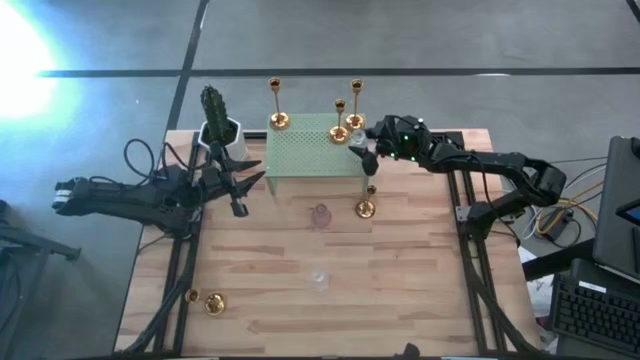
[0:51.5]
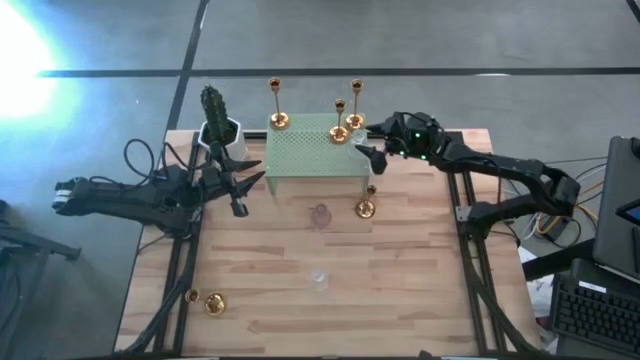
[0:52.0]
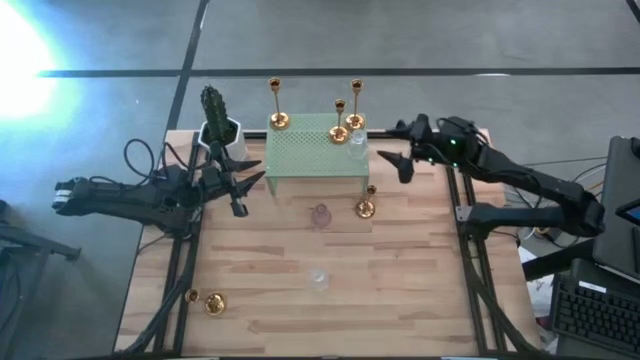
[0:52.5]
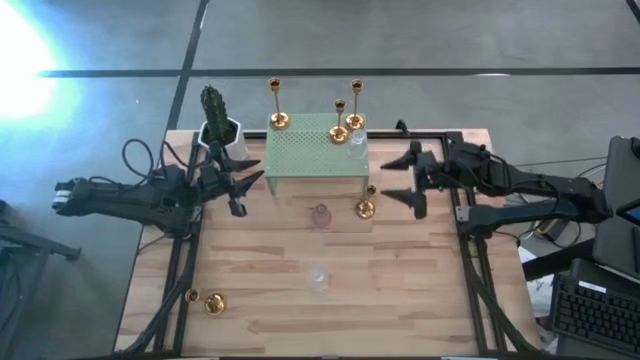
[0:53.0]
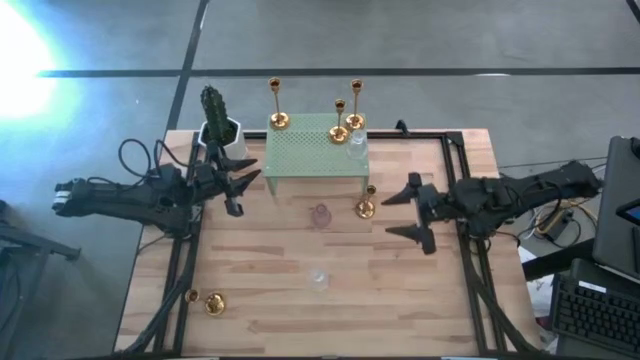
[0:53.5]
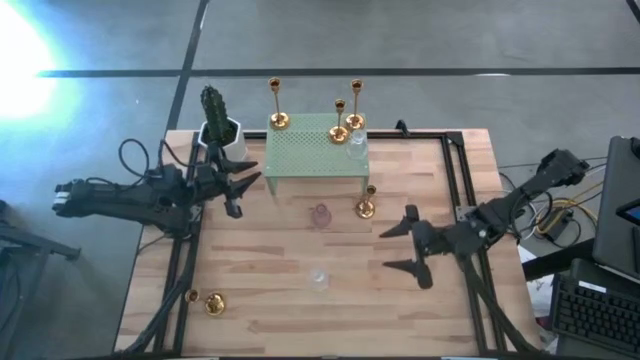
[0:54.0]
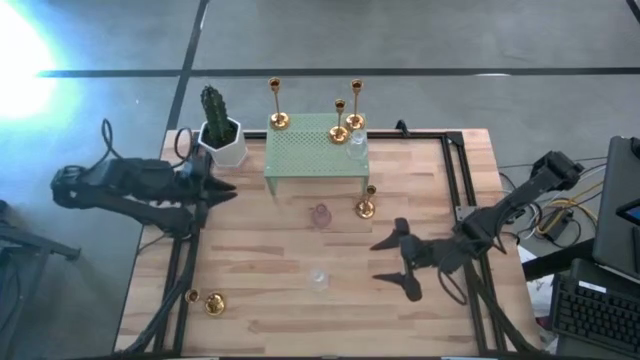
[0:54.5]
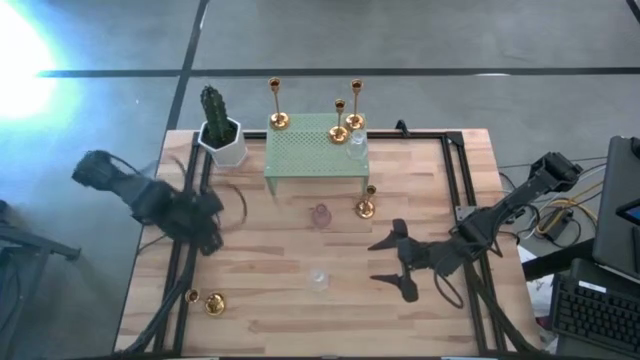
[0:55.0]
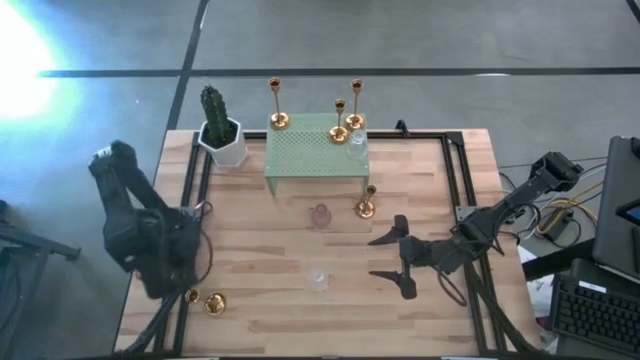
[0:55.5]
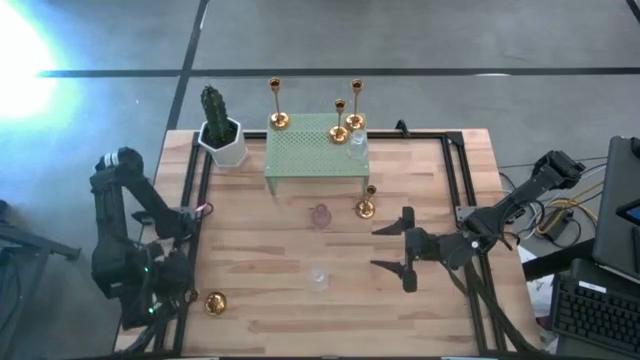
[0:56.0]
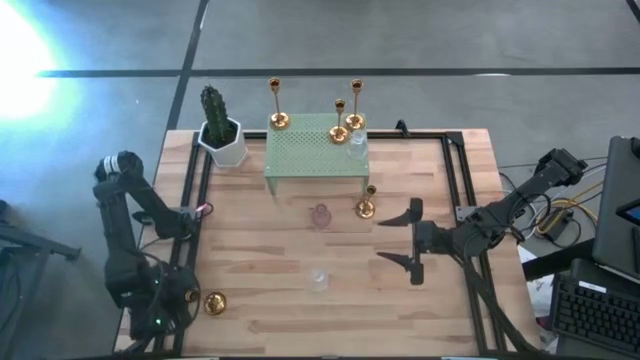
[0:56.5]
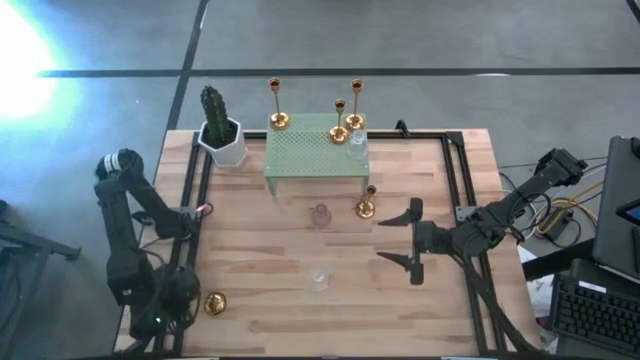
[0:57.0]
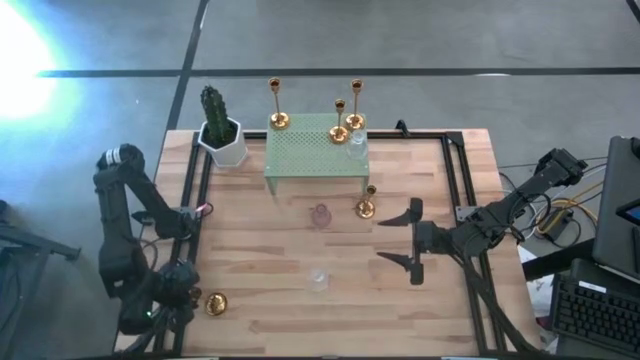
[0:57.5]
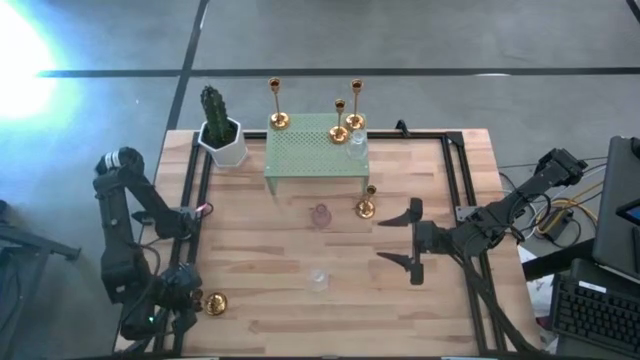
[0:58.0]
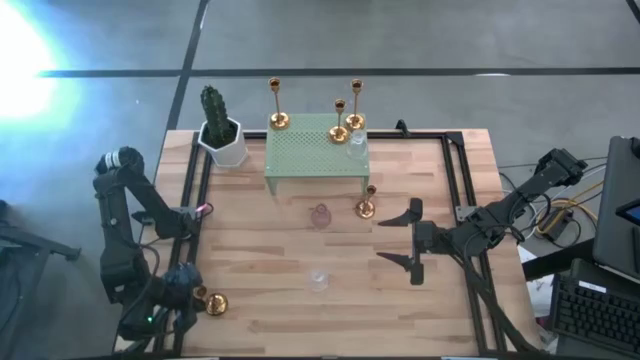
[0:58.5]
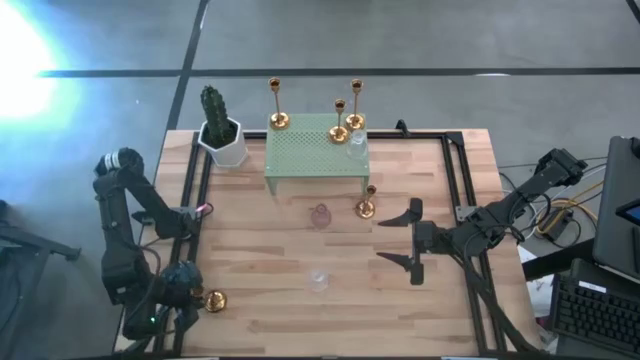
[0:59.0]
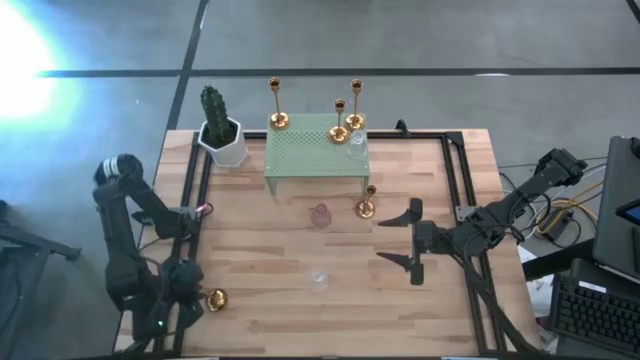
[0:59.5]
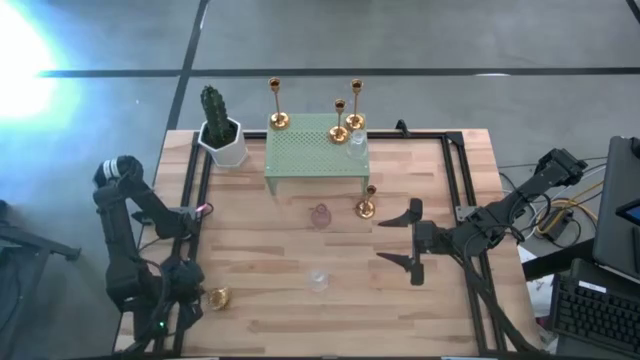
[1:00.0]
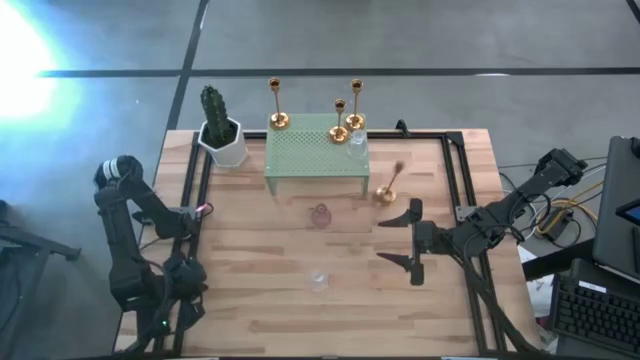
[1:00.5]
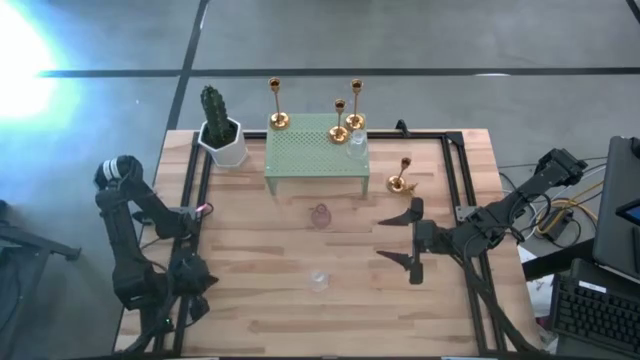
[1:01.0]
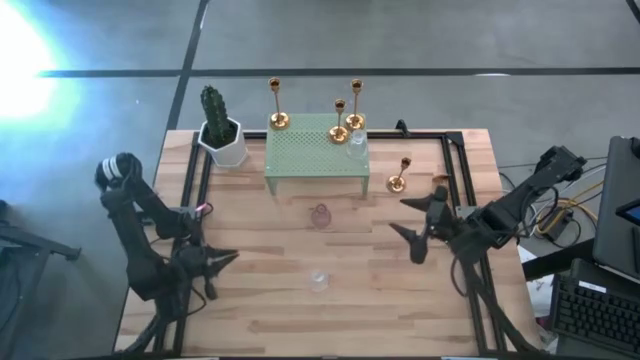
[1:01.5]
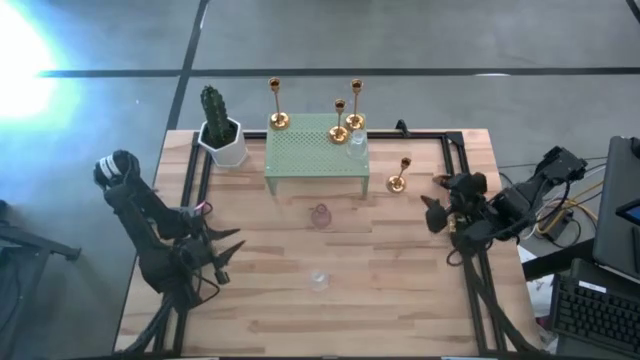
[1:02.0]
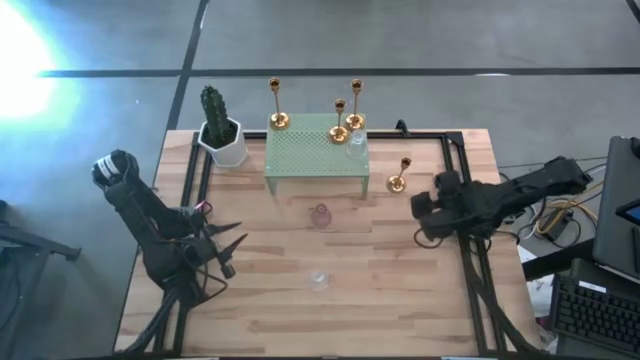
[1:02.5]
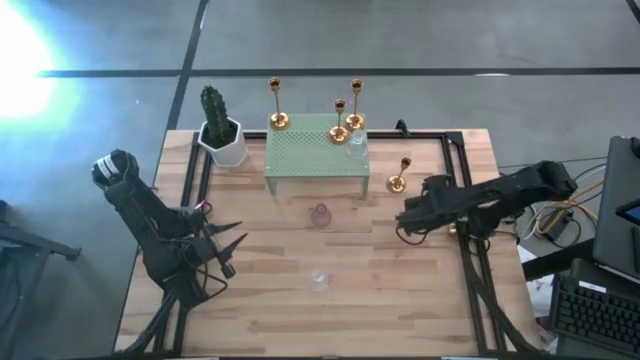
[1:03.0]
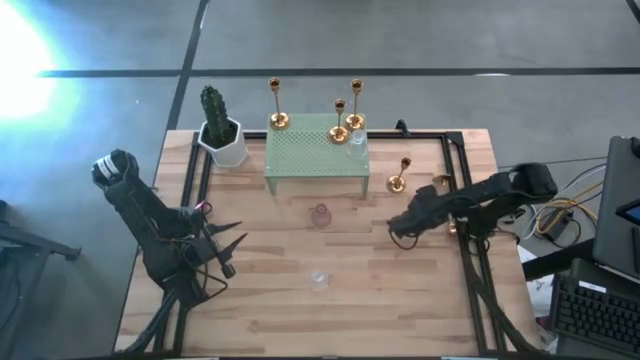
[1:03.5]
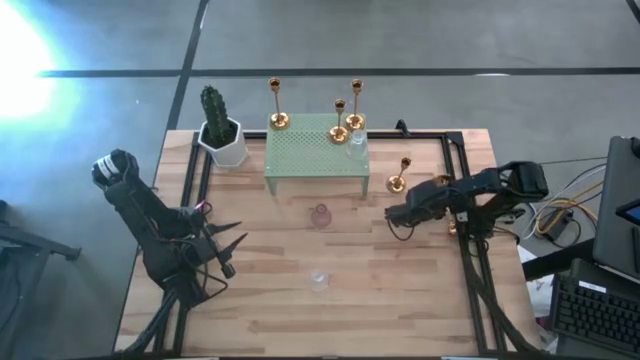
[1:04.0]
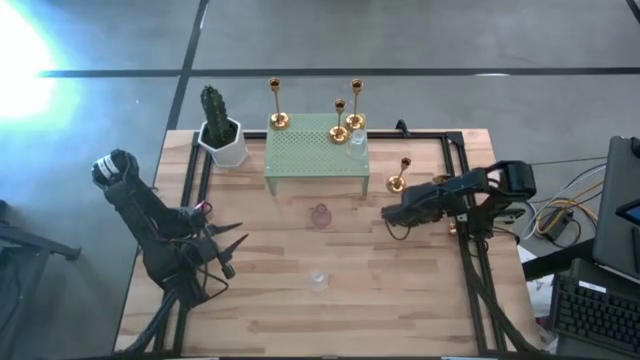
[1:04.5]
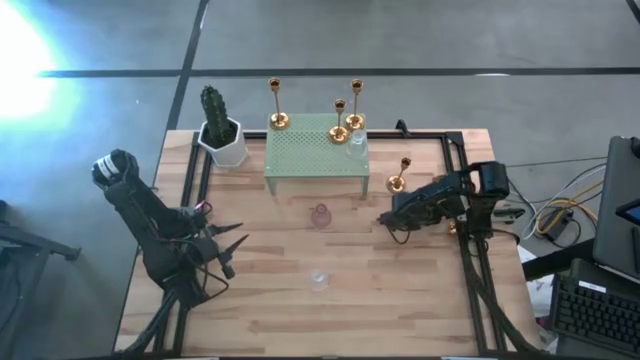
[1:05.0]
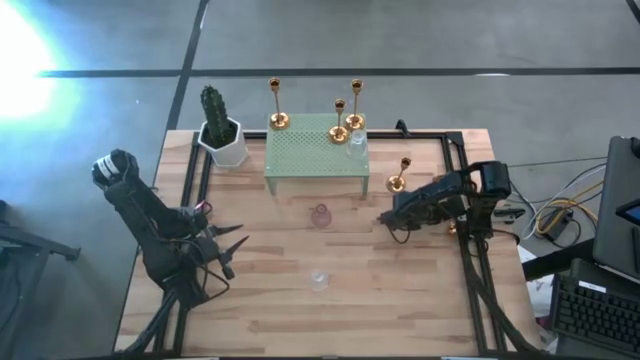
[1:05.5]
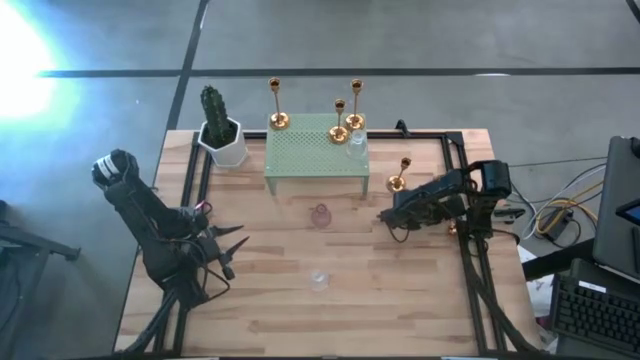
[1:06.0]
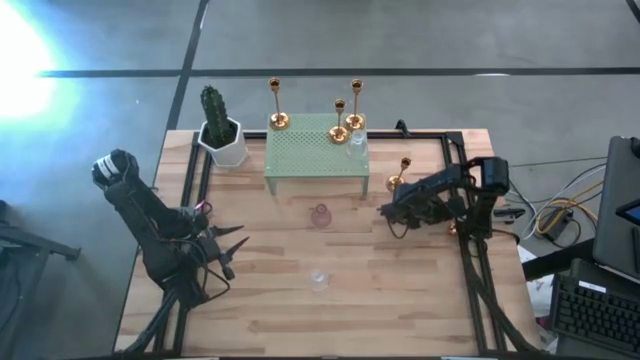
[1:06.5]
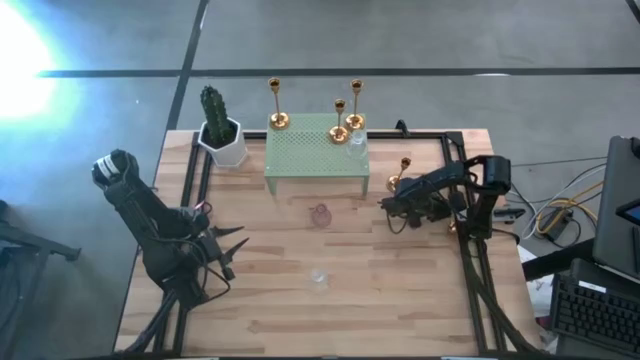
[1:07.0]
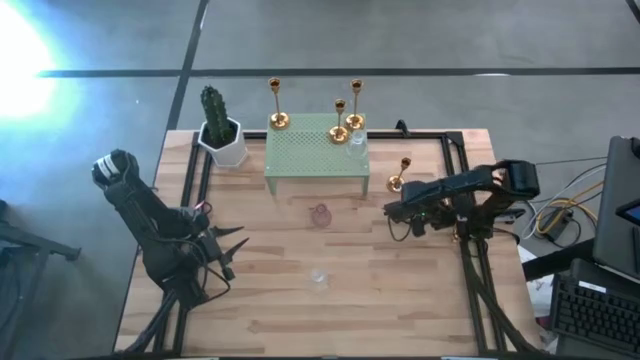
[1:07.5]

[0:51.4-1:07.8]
Task: Pick & Place candle stick holders
Put the gold candle holder on the shelf

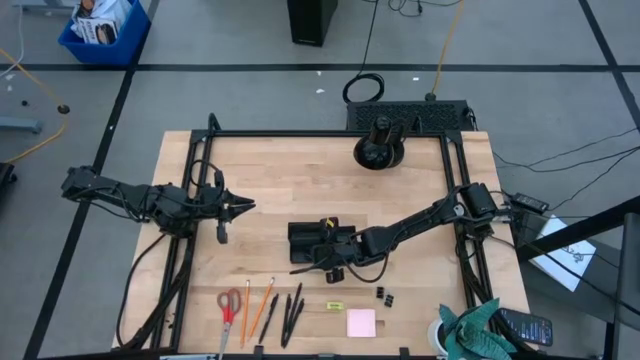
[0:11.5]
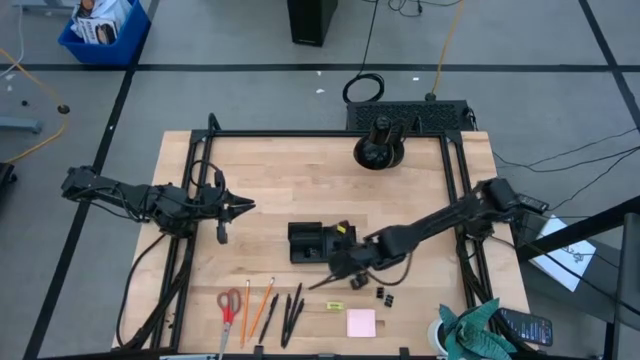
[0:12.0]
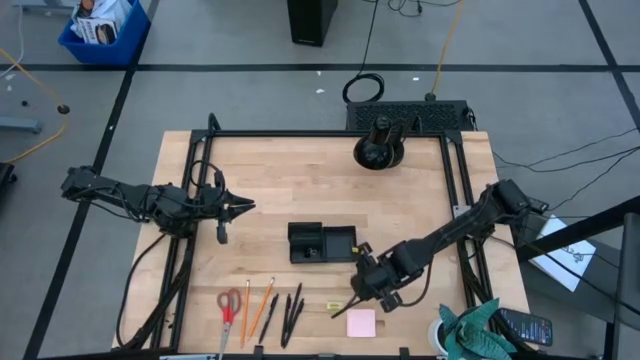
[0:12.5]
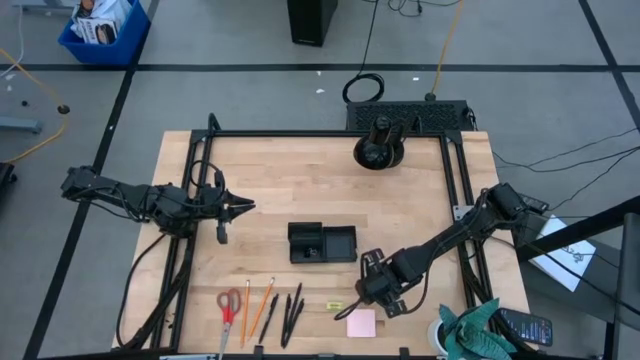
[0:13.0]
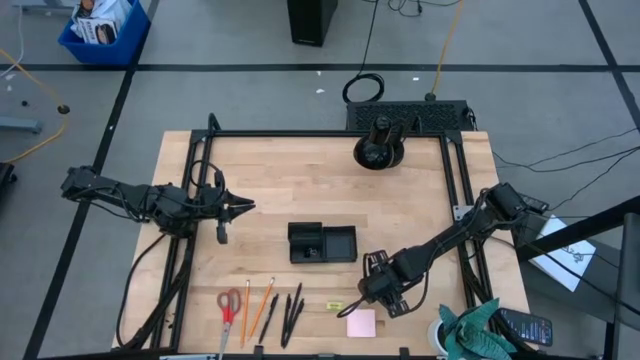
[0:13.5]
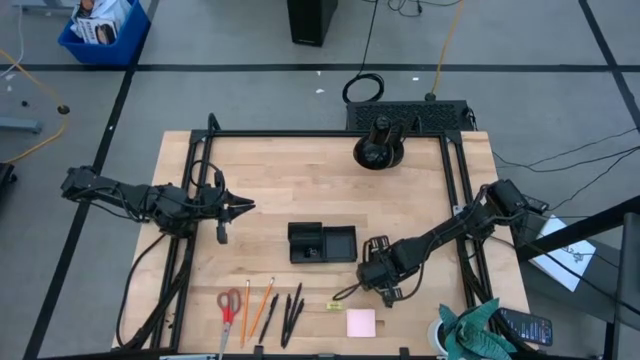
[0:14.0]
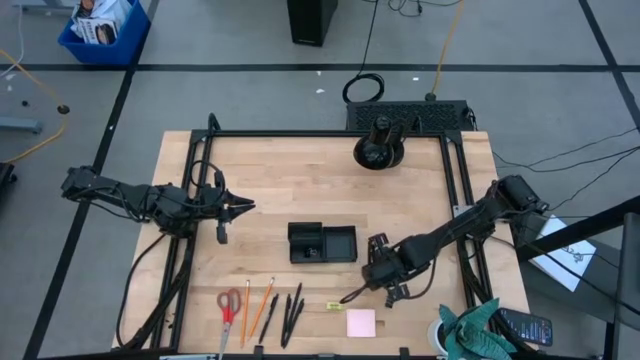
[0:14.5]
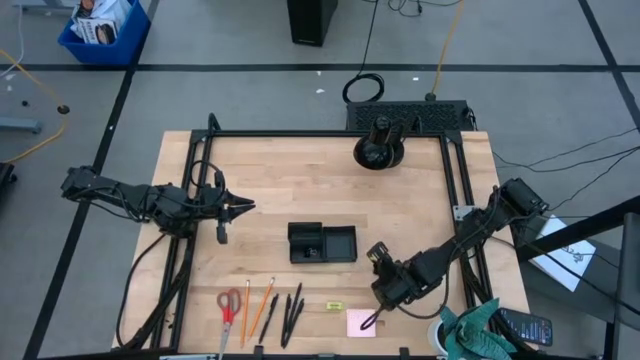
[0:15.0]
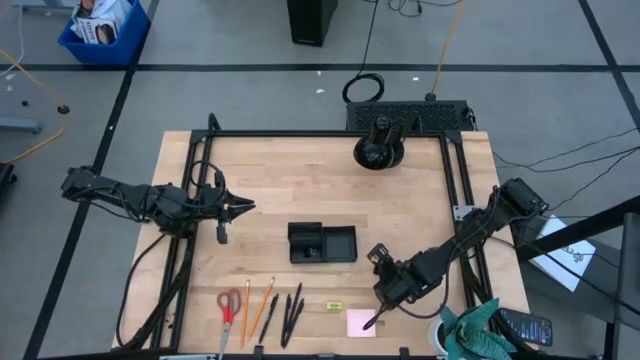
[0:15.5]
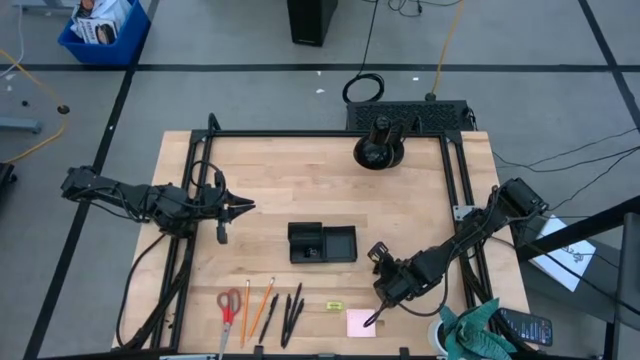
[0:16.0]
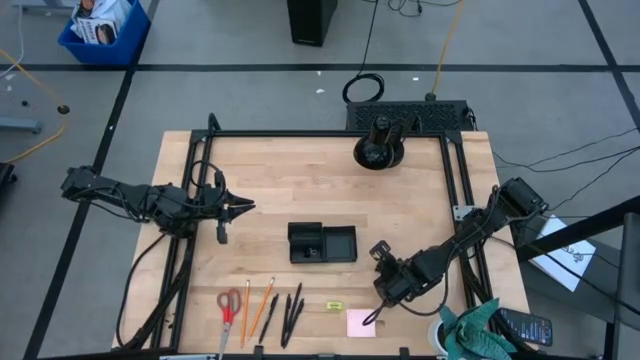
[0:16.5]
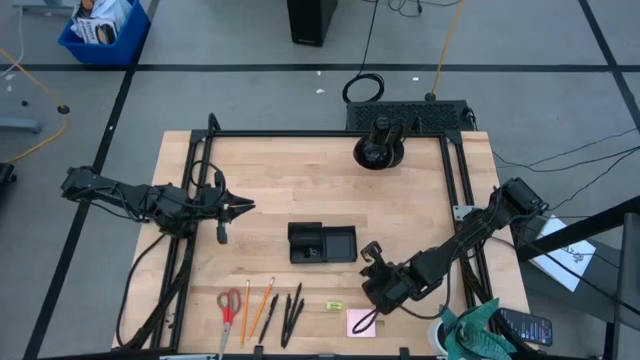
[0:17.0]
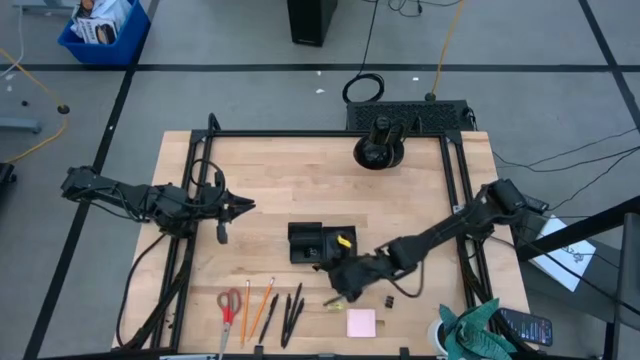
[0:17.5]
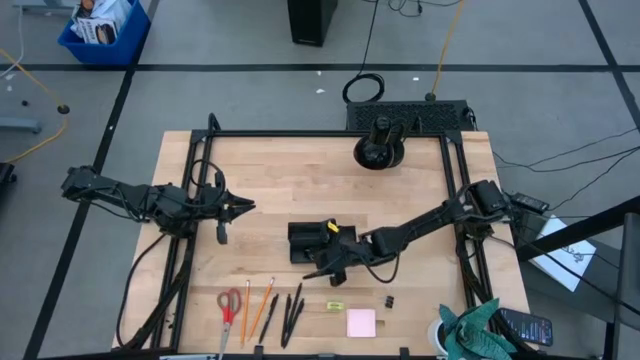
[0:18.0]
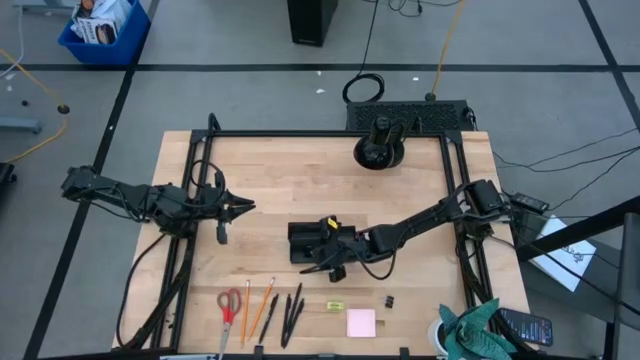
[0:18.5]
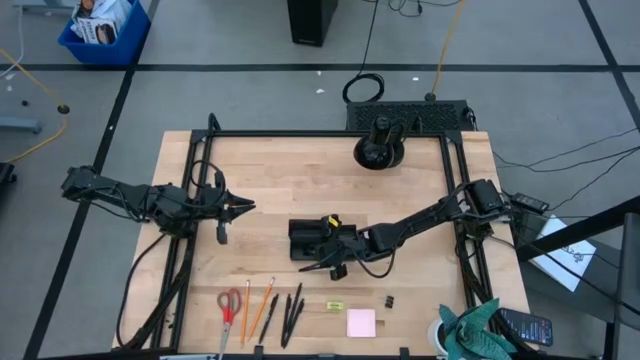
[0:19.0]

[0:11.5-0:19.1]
Task: Pick and place office supplies into organizer
Put the black binder clip into the black desk organizer
